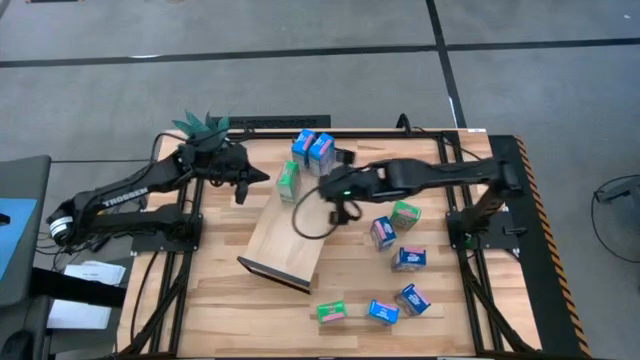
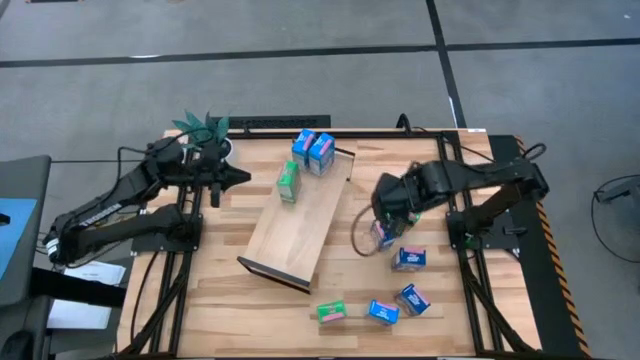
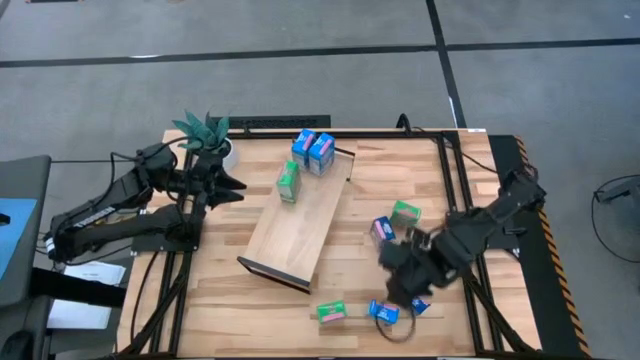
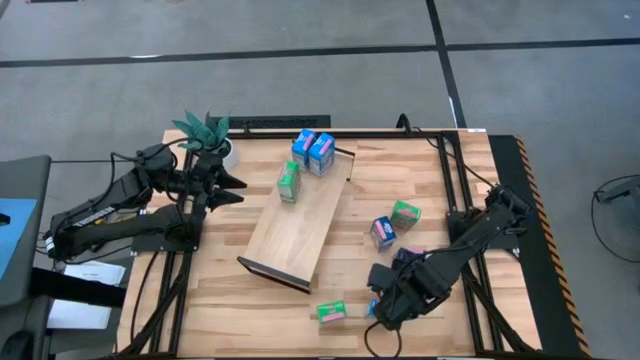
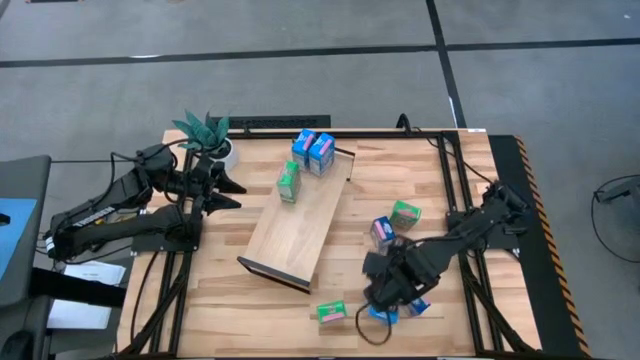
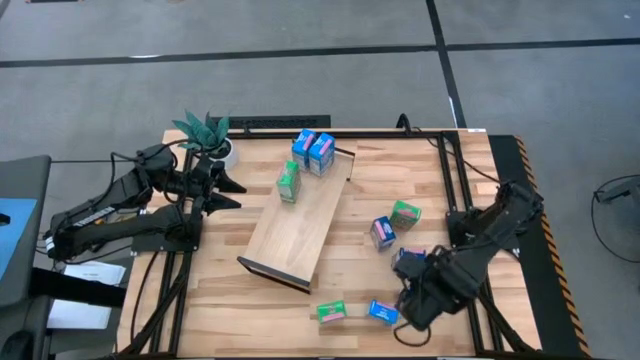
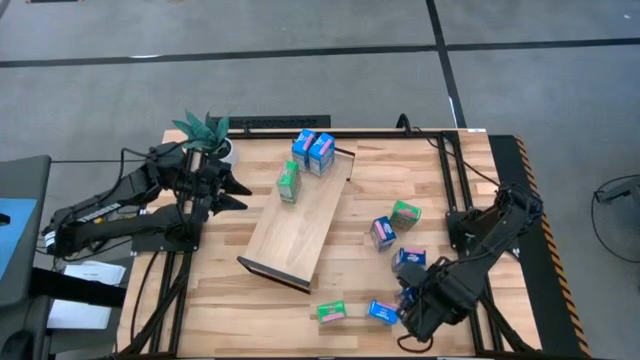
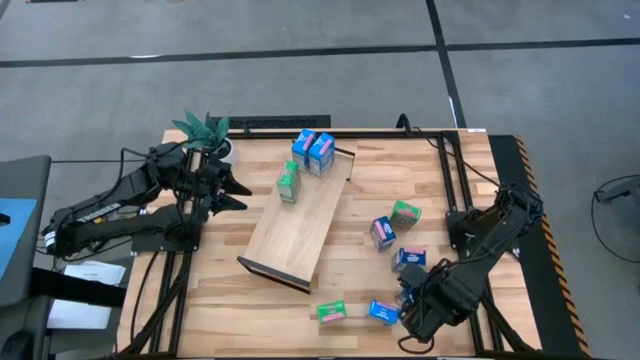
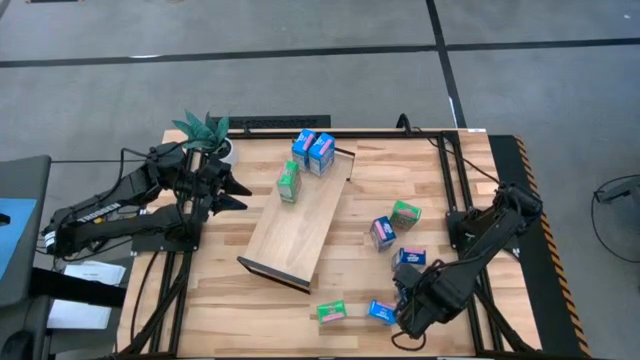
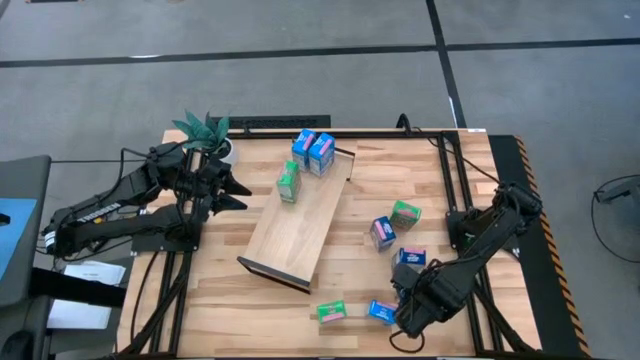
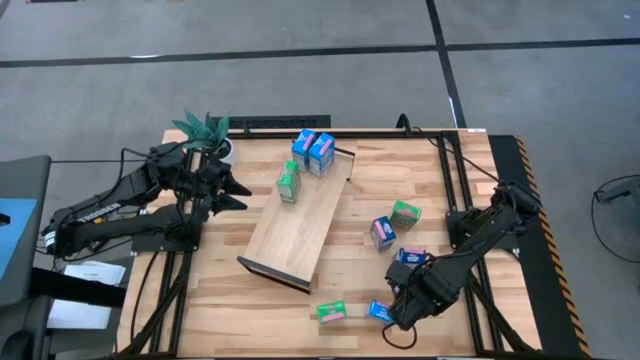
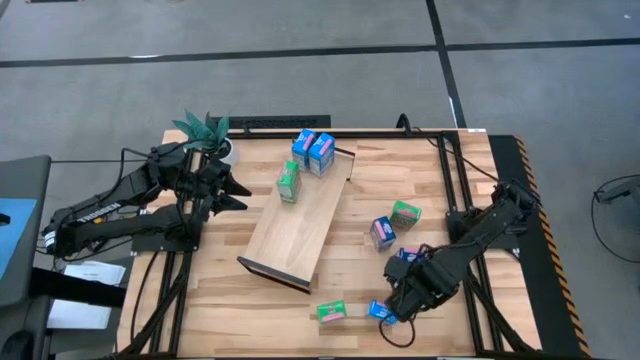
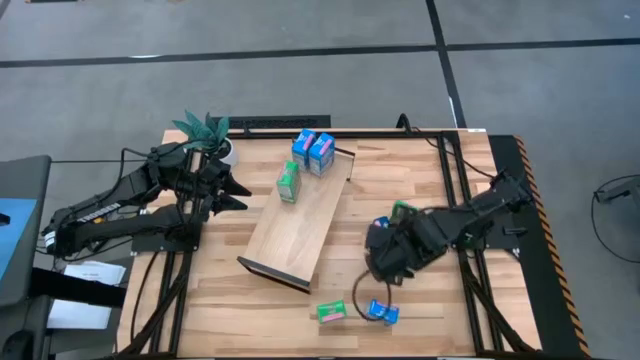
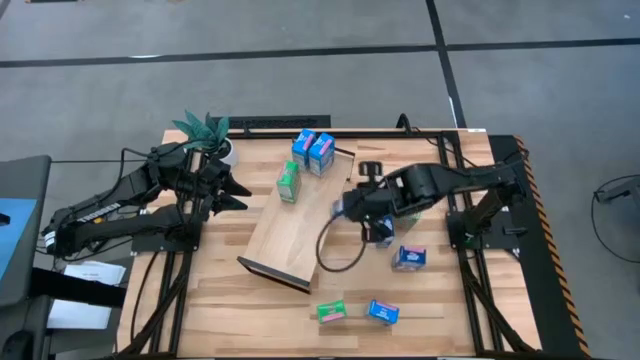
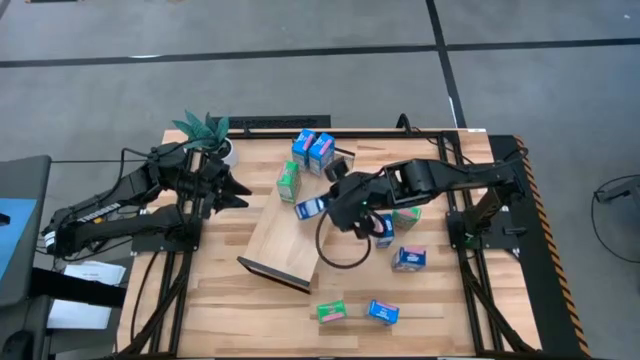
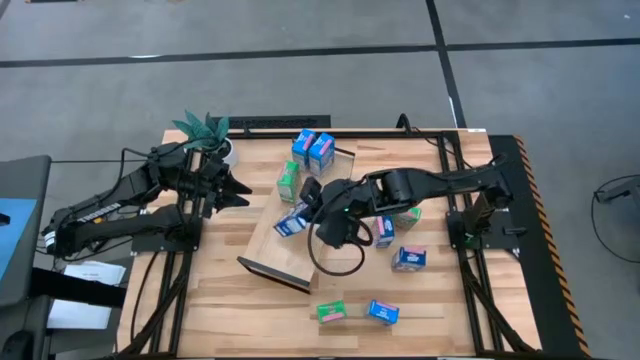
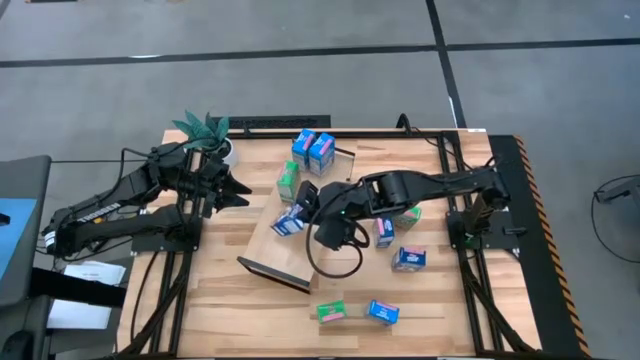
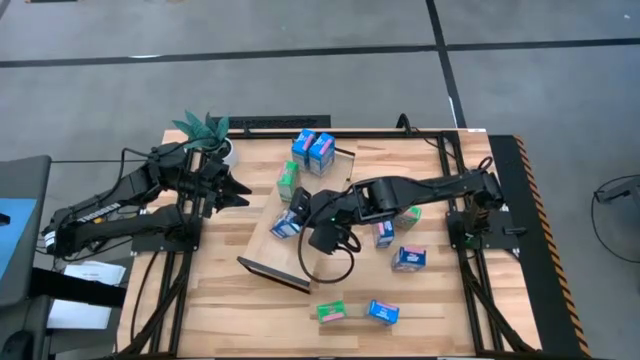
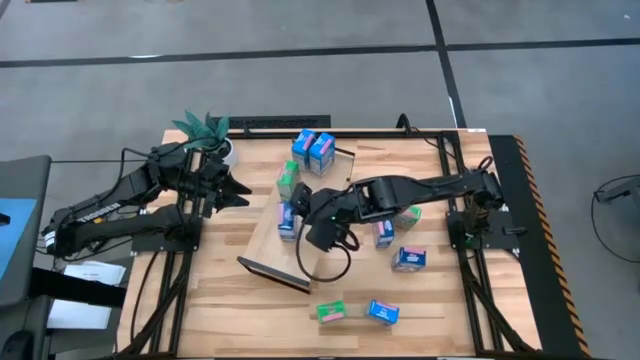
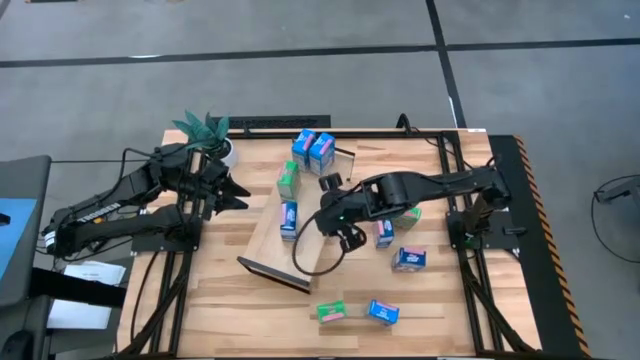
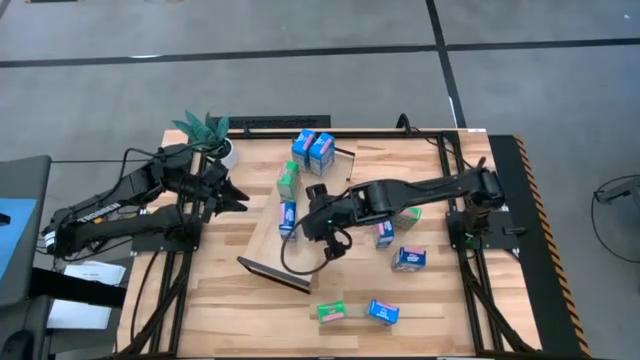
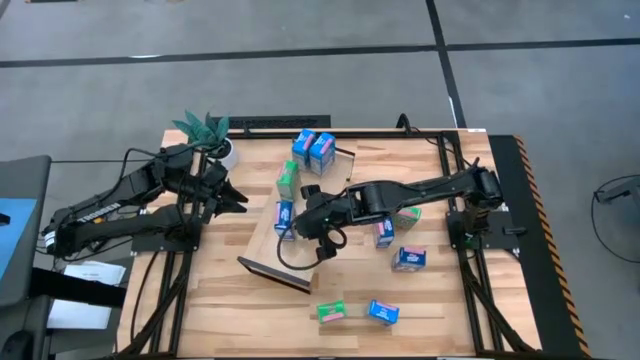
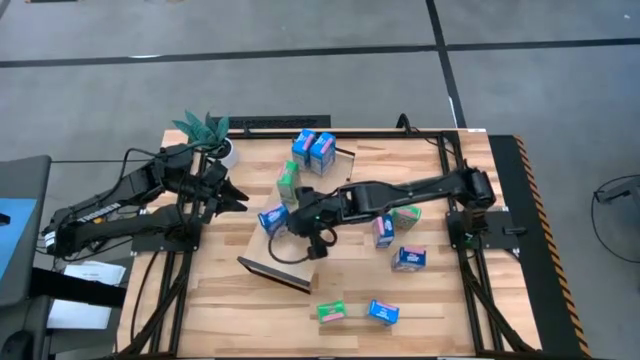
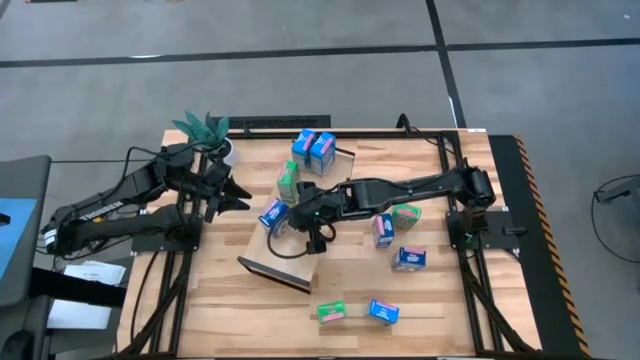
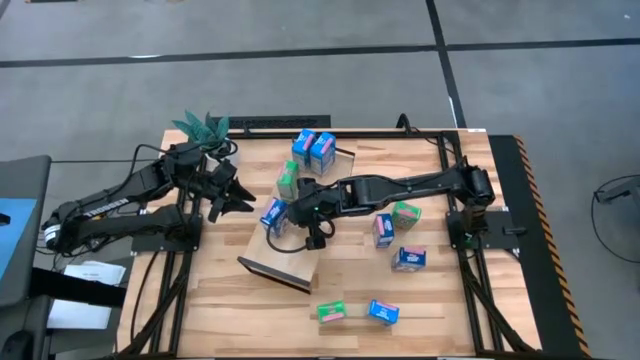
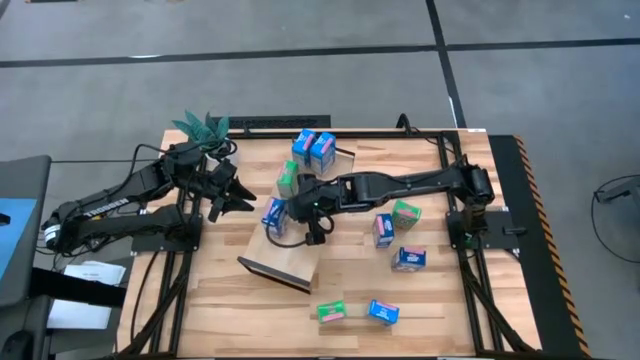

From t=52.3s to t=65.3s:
Task: Stack cereal on shelf
Put the bottom dark blue cereal box on the shelf

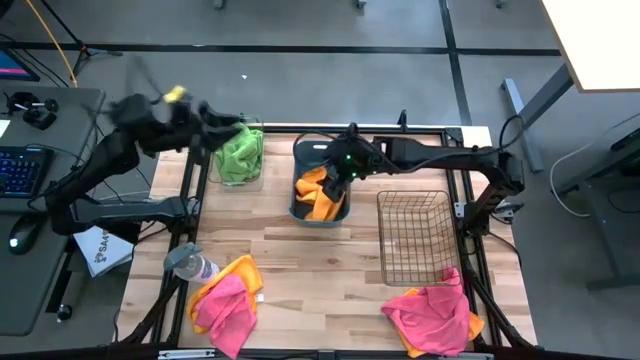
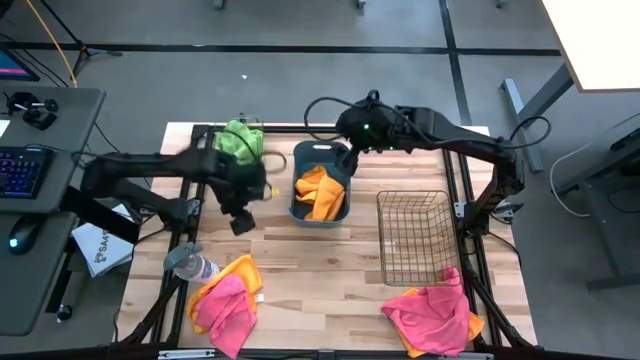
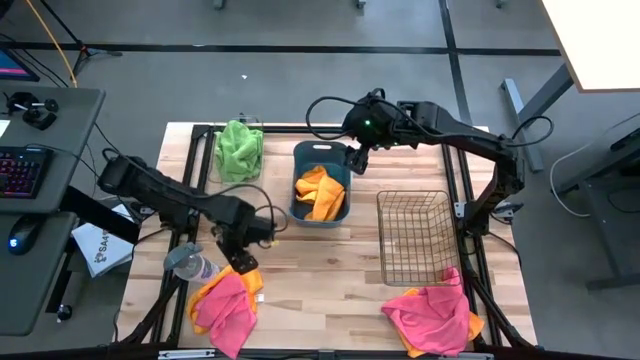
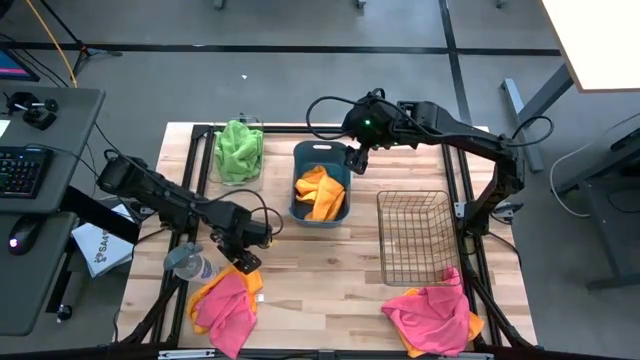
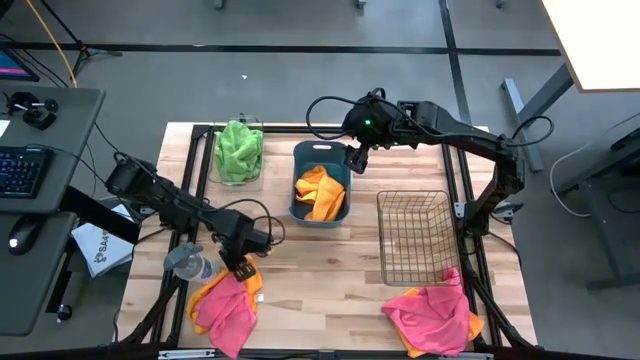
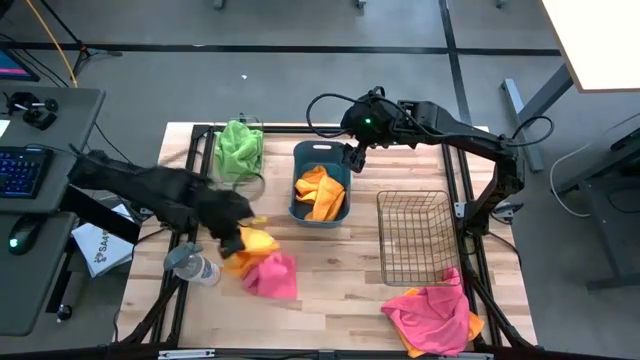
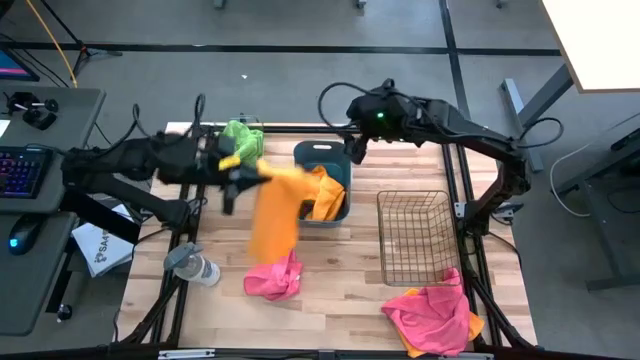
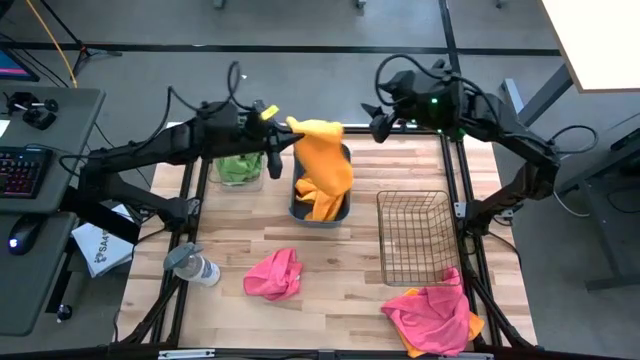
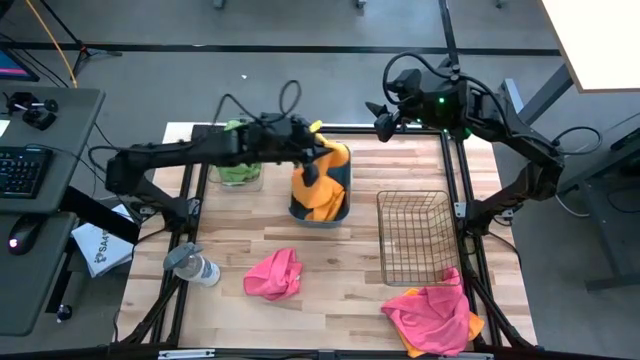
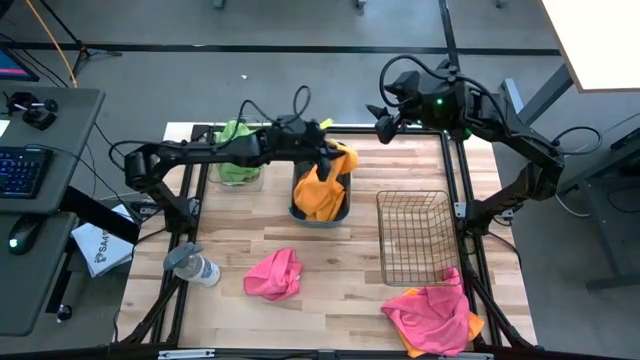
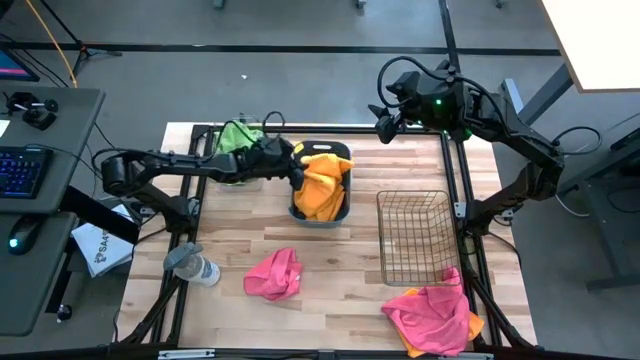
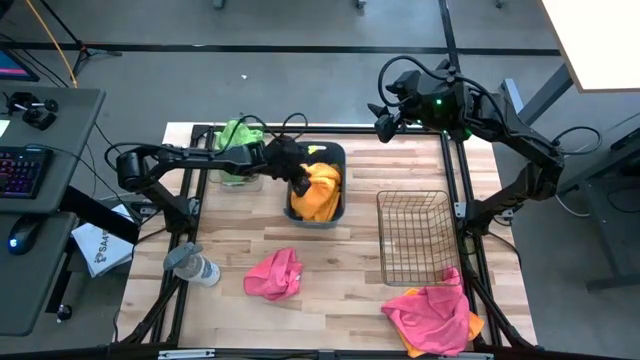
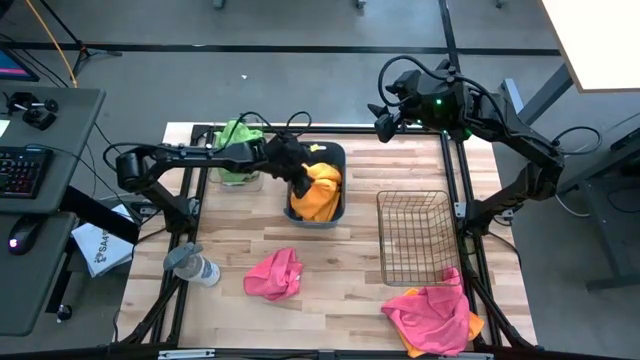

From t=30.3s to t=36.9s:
Task: Sort microfiber towel by color & place in baskets
Put the left orange towel into the blue bin
